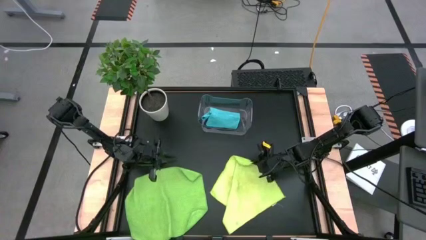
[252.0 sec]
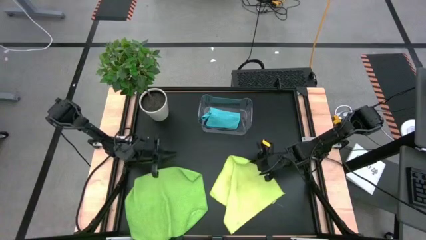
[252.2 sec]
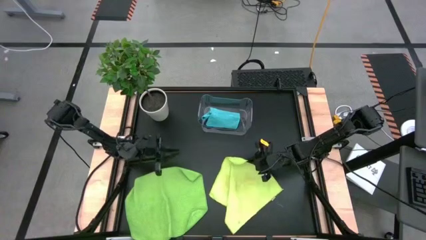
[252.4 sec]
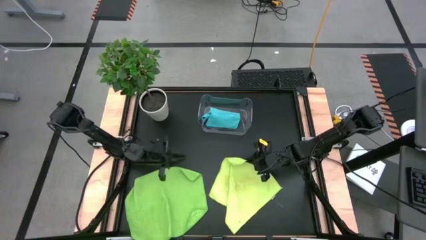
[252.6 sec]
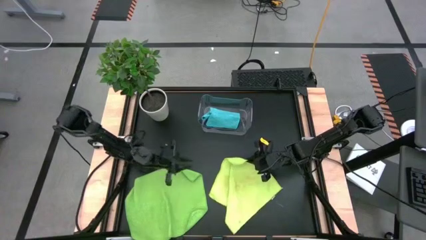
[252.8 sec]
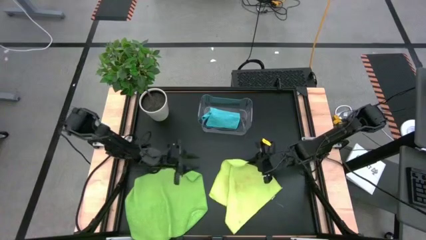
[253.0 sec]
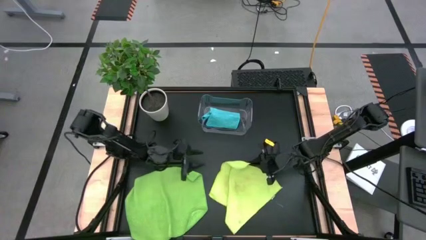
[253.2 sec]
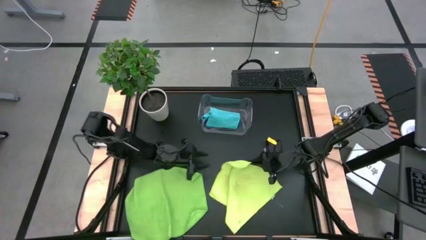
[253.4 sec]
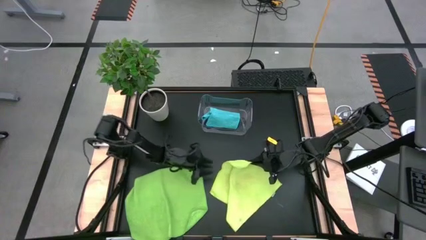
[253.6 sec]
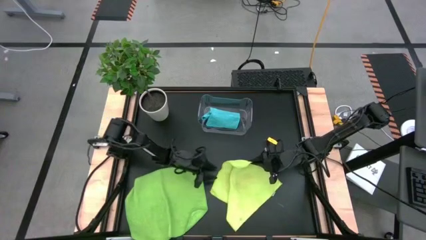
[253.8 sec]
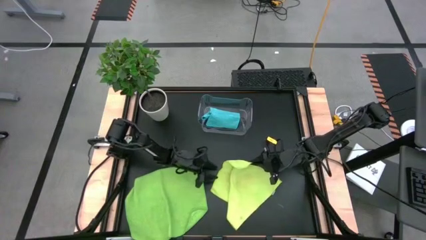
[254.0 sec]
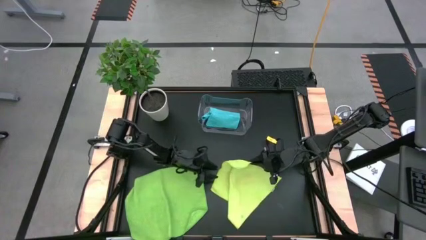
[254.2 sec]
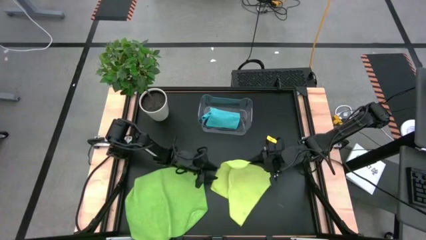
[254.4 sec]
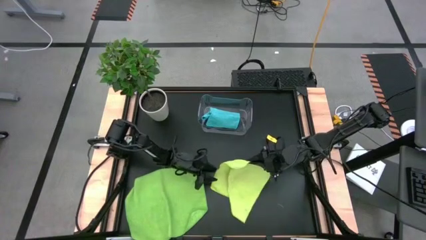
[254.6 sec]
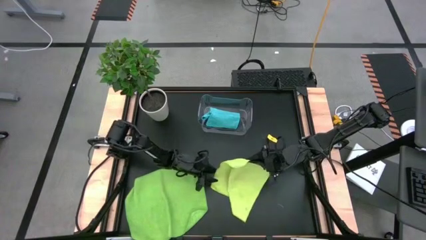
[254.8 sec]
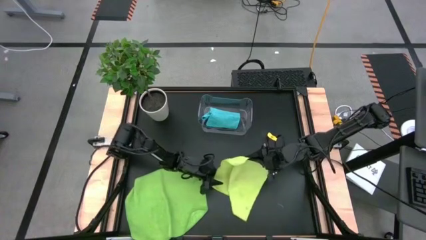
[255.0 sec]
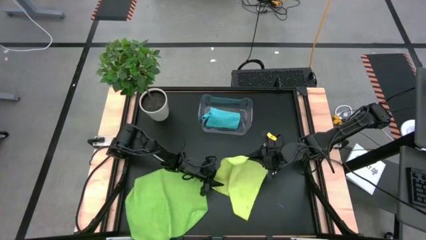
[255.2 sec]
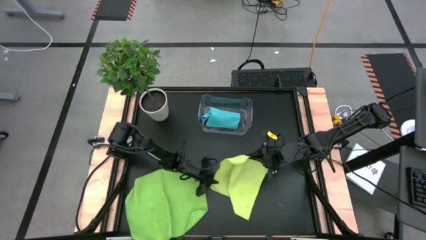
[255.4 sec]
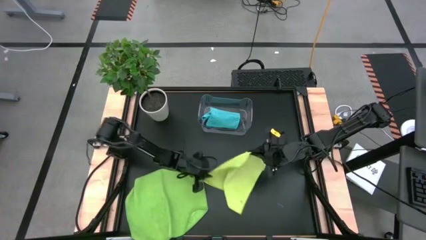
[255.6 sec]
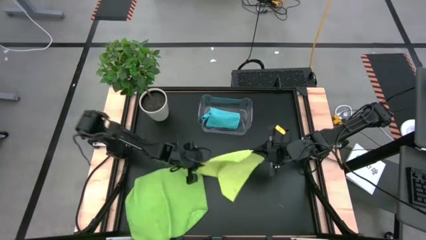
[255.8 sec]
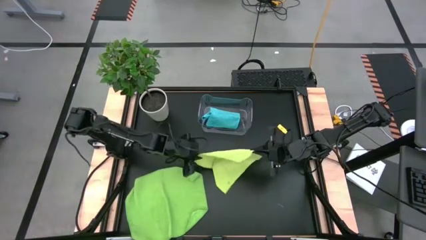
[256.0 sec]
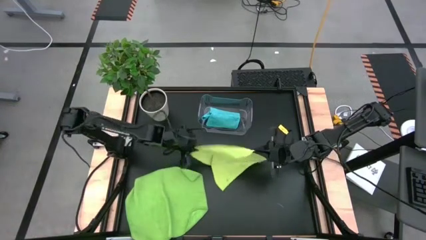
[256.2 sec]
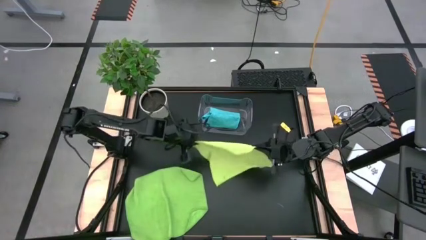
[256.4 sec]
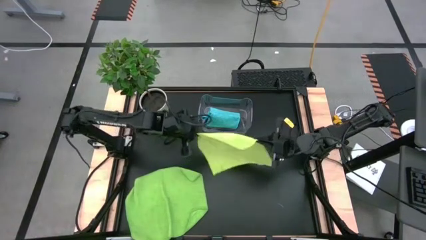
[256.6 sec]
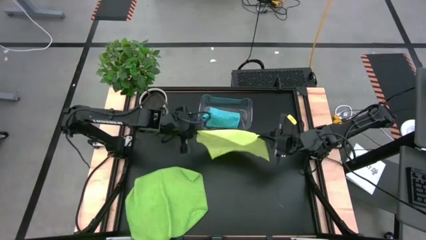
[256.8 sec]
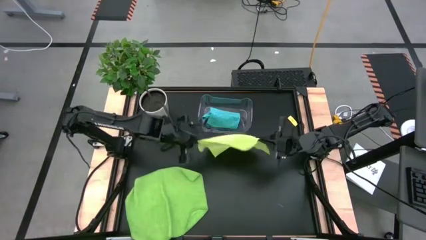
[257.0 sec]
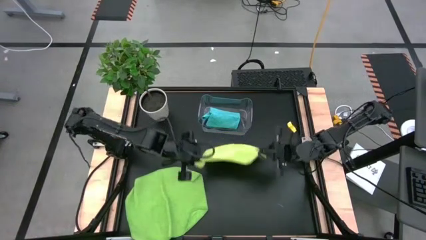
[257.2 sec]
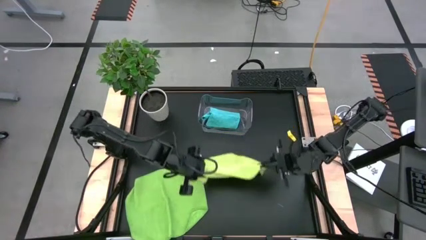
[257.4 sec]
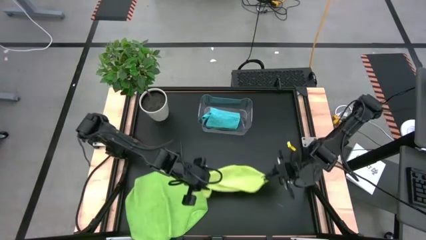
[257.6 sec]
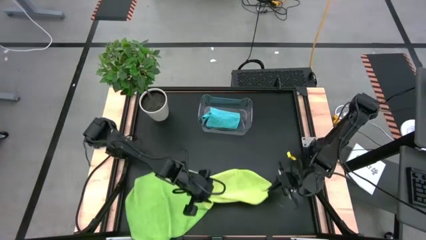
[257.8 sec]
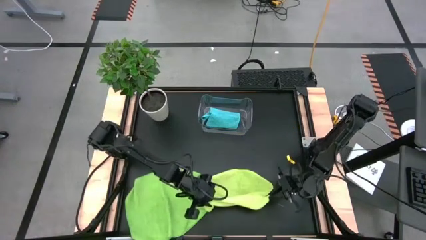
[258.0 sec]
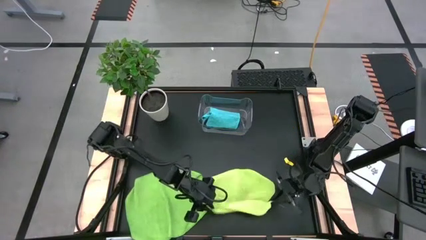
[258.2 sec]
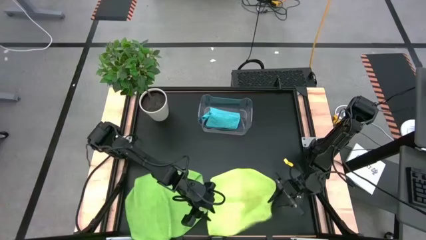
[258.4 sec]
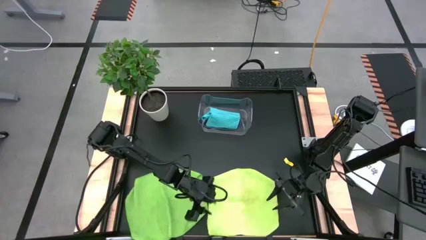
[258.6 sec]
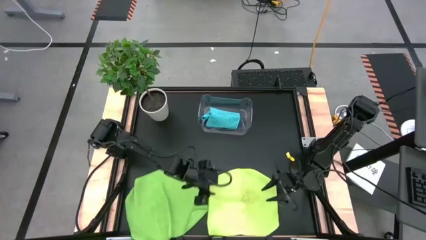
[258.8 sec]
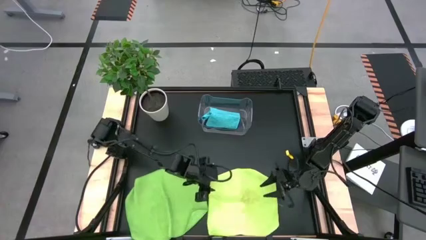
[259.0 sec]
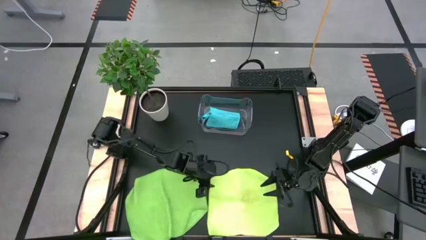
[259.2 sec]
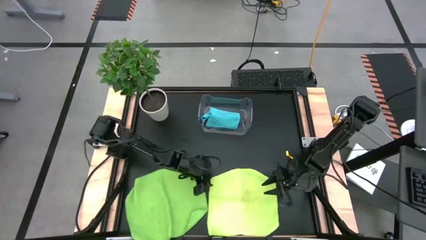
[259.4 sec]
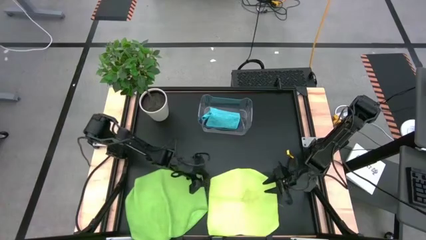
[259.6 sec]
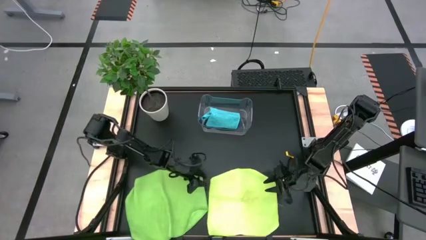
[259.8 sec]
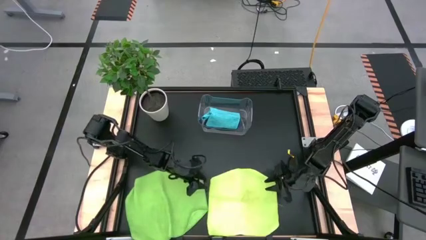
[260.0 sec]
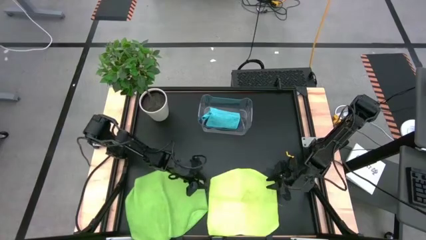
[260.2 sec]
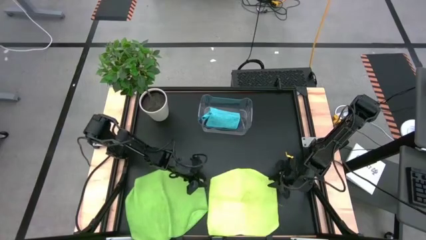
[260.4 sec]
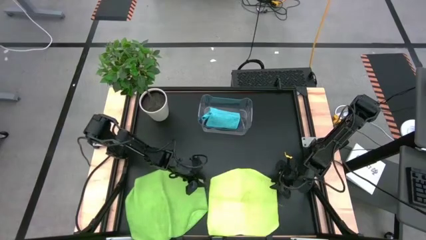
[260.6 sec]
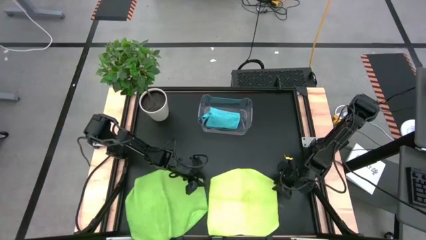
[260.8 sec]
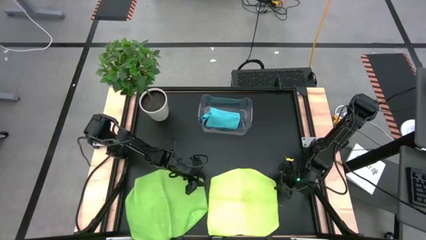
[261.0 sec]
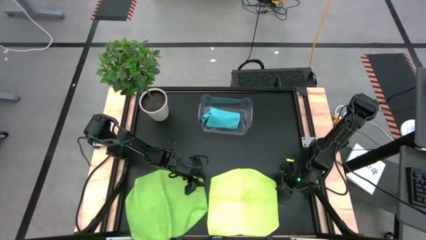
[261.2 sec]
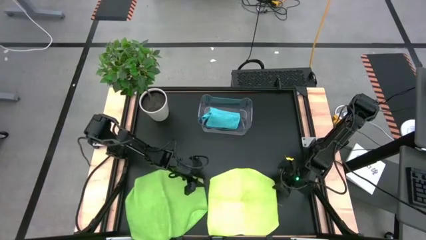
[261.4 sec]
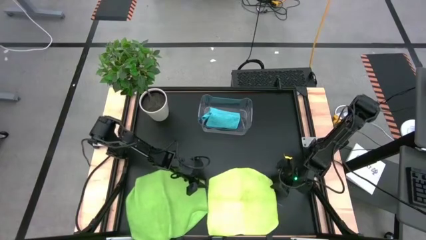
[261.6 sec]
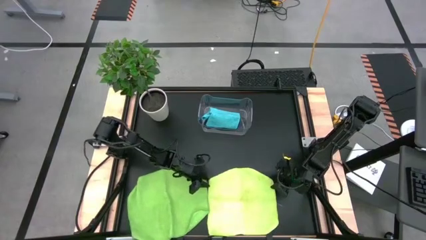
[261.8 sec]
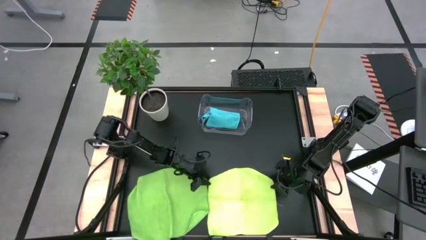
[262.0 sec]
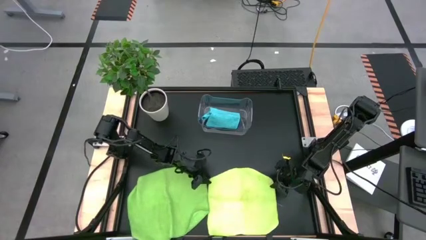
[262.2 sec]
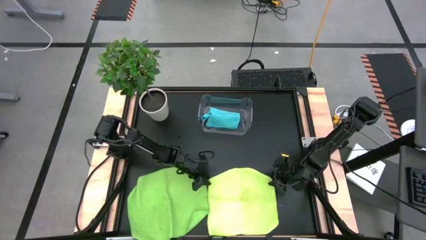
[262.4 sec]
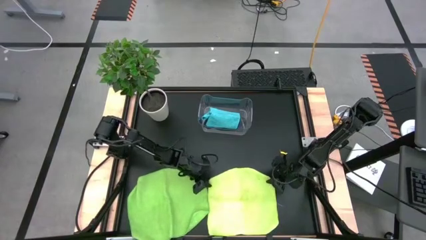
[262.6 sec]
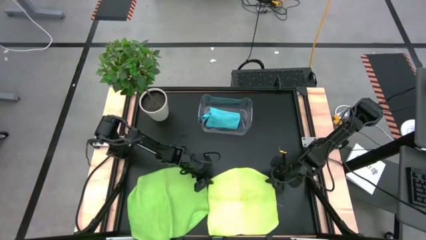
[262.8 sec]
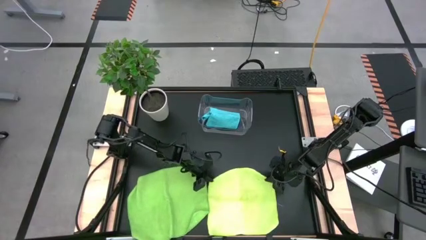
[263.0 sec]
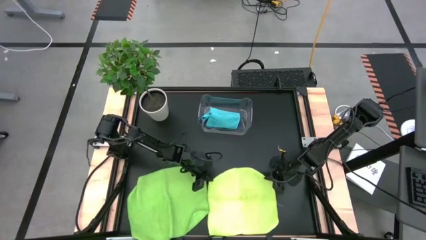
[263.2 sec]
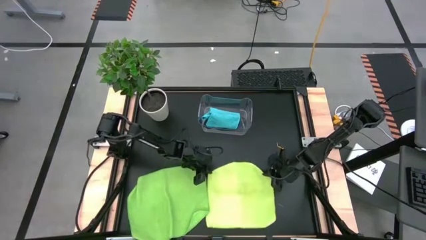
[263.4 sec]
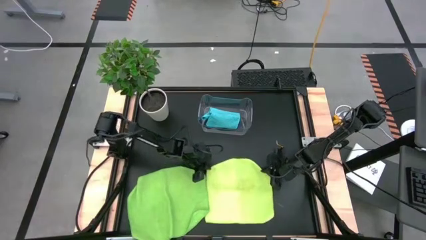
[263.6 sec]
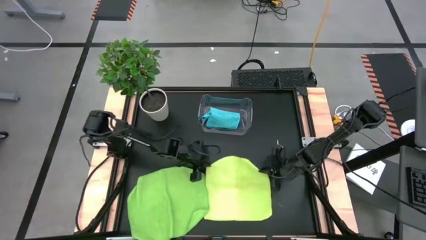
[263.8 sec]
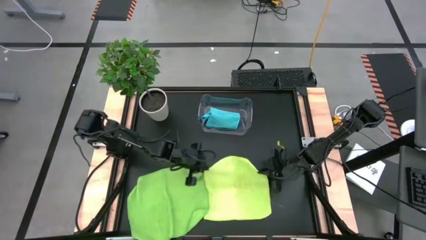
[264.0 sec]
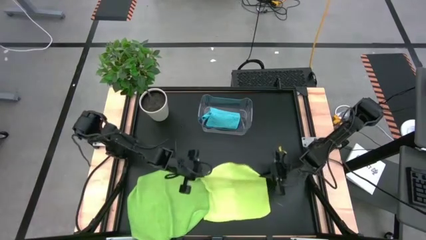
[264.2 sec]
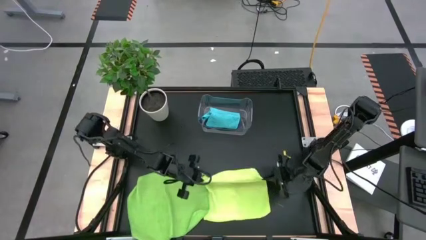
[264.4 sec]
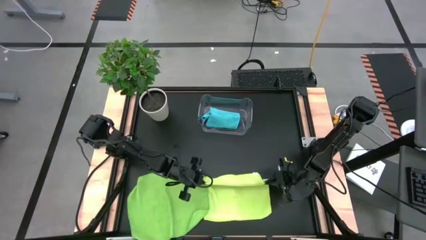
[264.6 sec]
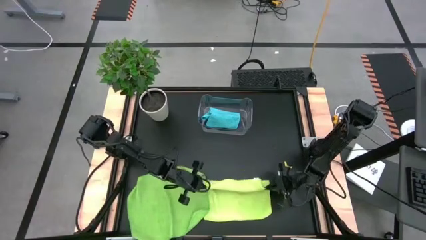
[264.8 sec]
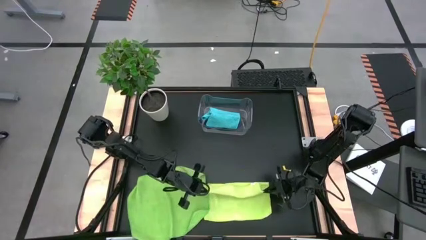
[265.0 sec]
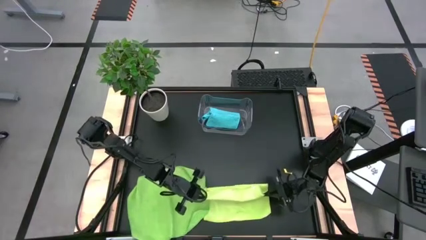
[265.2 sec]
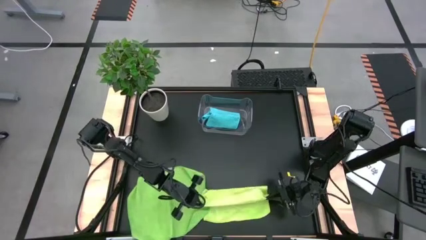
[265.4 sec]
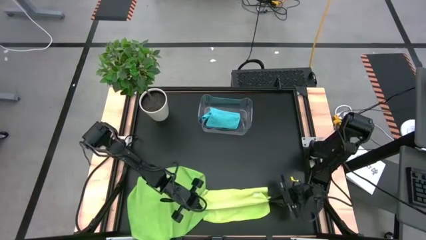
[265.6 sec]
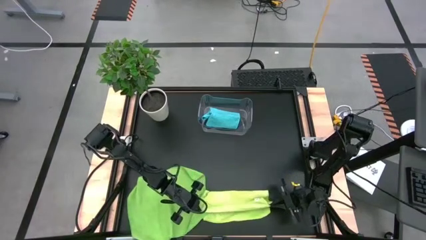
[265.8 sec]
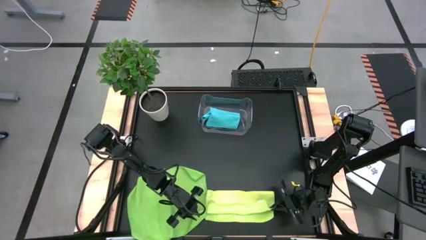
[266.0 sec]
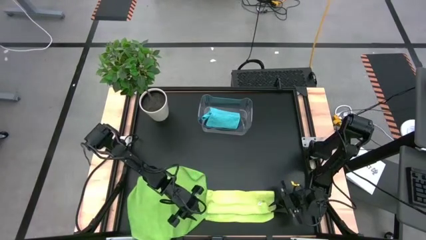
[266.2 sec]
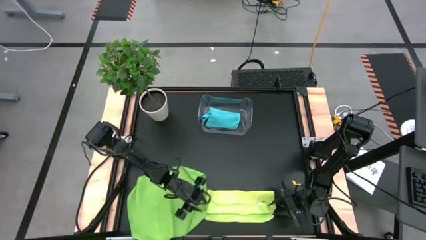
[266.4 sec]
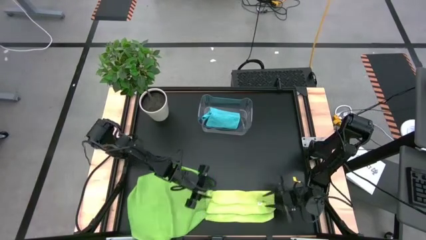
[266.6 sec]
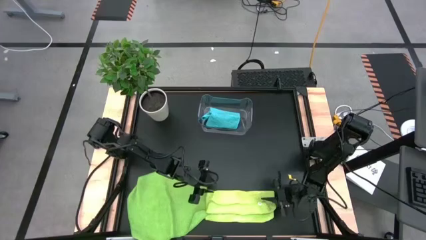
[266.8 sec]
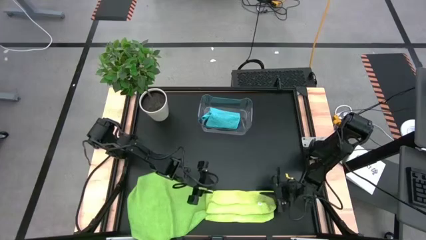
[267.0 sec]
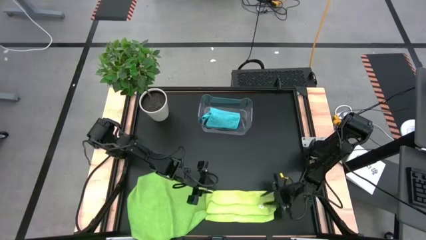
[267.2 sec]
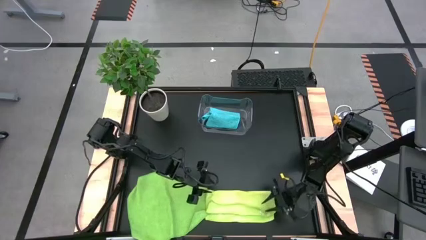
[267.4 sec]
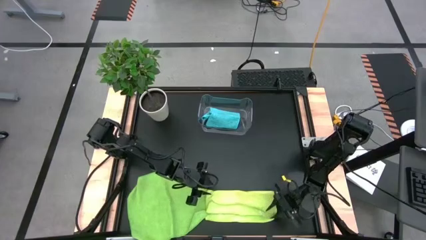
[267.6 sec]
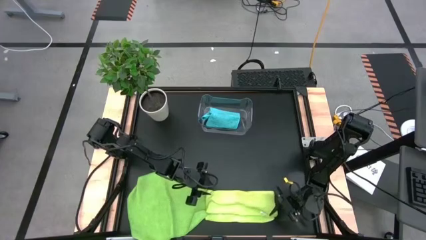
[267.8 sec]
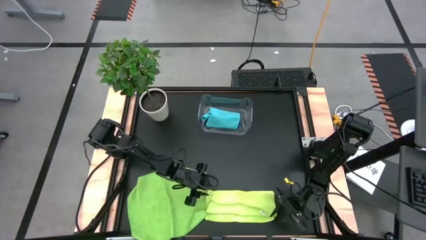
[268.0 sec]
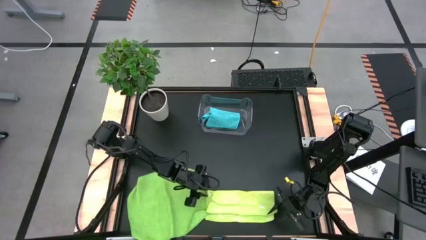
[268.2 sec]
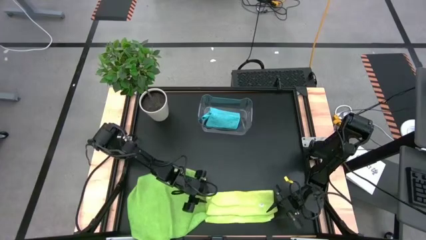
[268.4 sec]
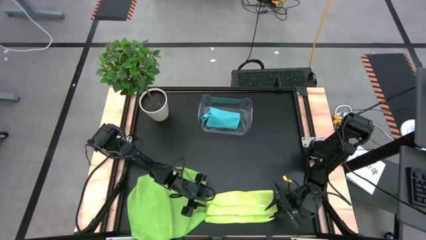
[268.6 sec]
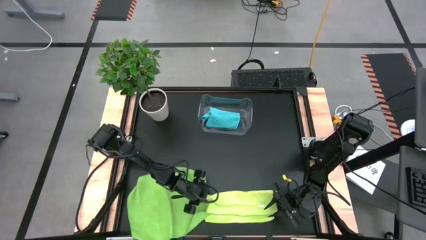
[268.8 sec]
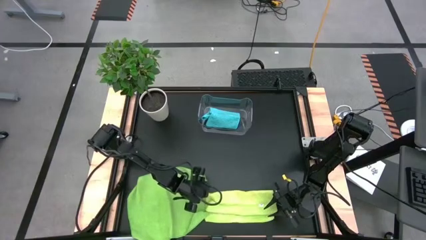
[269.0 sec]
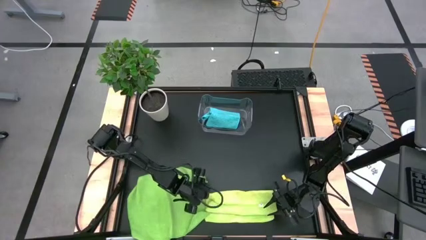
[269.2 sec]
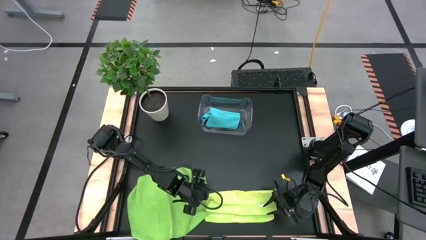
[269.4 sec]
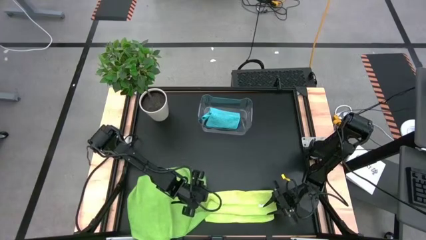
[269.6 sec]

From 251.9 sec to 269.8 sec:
Task: Fold microfiber towels
Fold the light green towel
